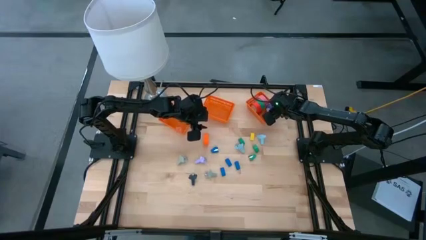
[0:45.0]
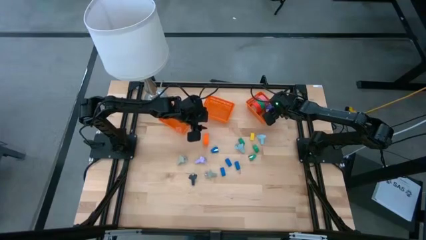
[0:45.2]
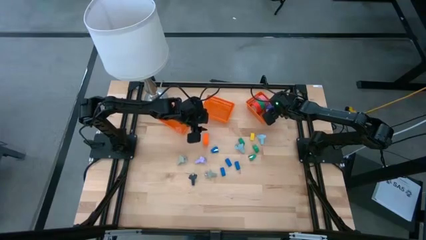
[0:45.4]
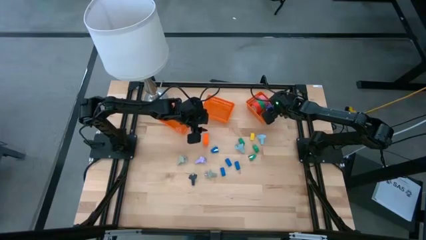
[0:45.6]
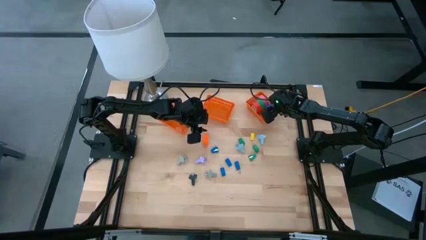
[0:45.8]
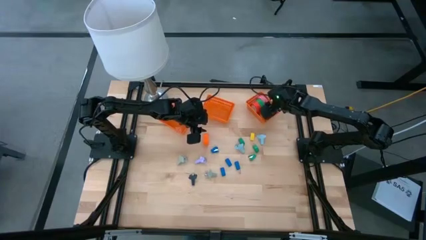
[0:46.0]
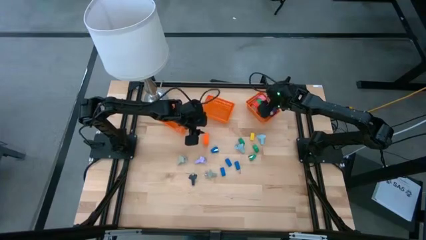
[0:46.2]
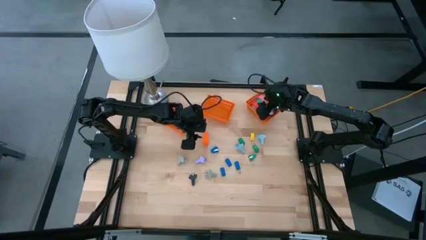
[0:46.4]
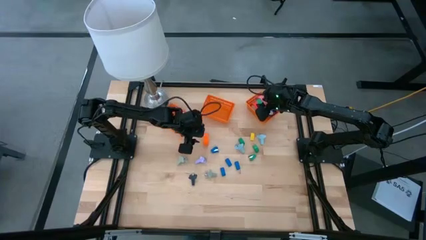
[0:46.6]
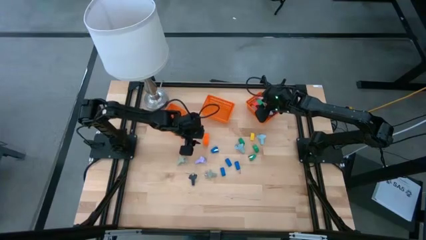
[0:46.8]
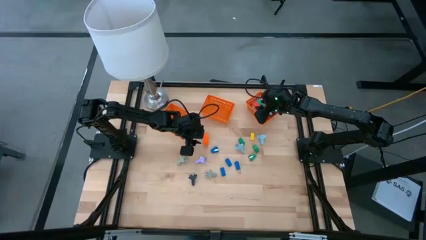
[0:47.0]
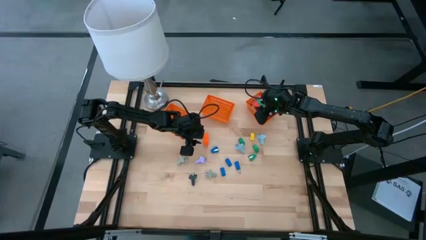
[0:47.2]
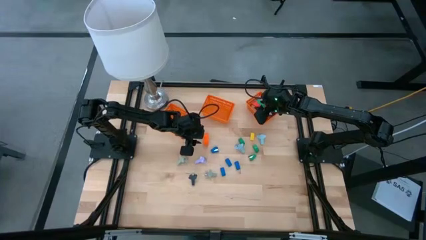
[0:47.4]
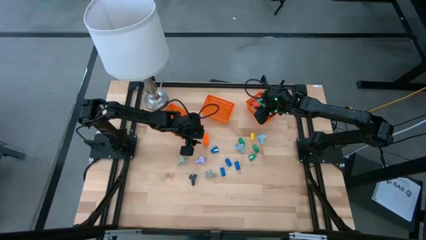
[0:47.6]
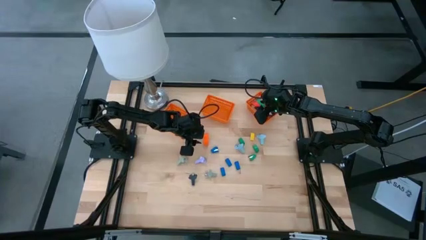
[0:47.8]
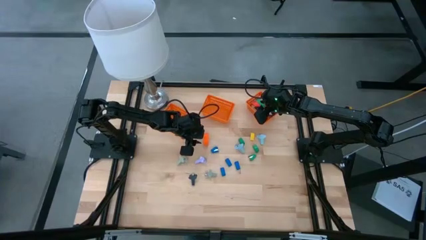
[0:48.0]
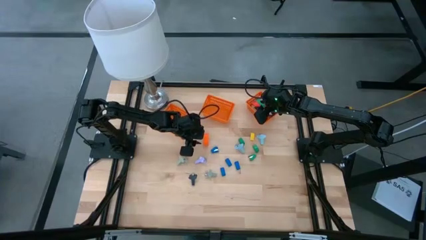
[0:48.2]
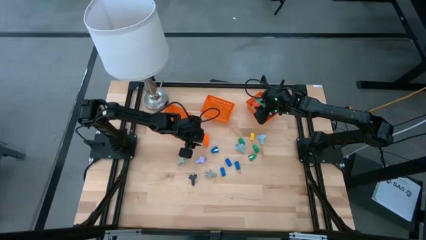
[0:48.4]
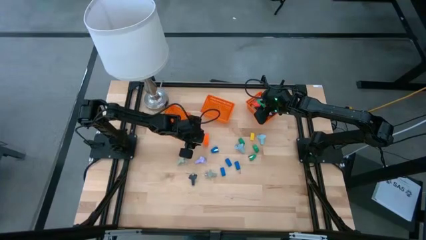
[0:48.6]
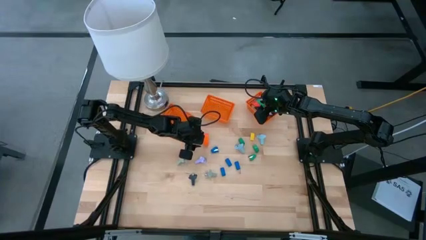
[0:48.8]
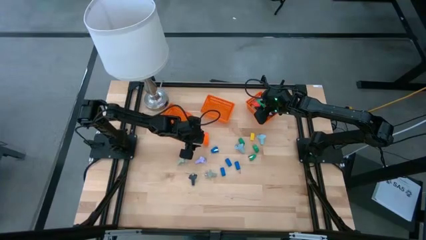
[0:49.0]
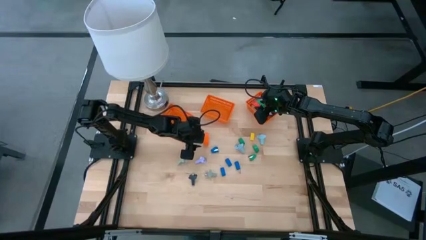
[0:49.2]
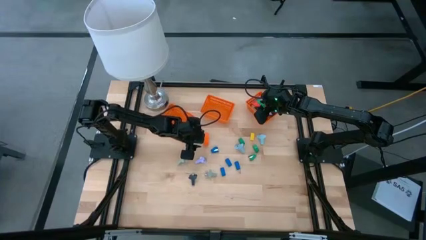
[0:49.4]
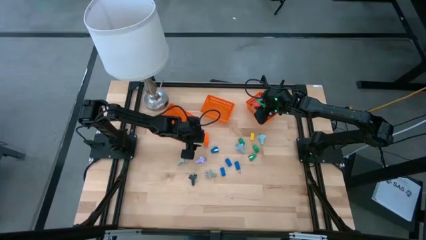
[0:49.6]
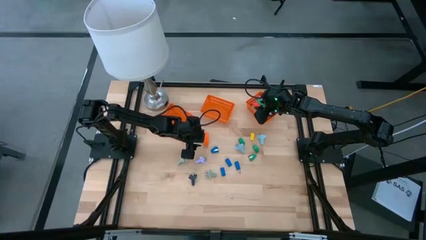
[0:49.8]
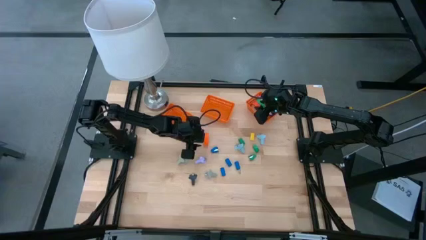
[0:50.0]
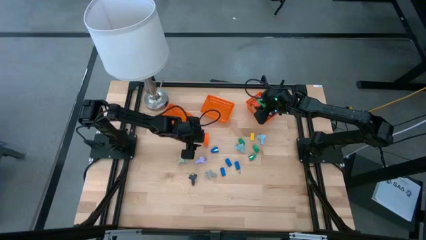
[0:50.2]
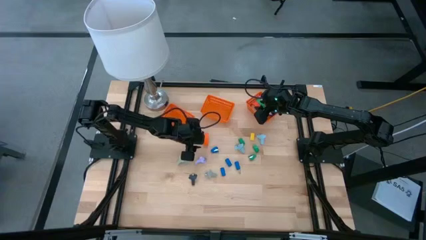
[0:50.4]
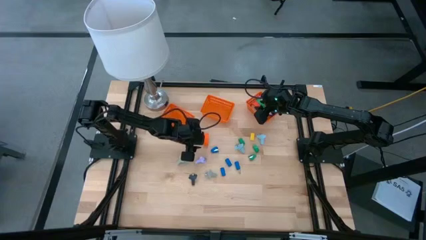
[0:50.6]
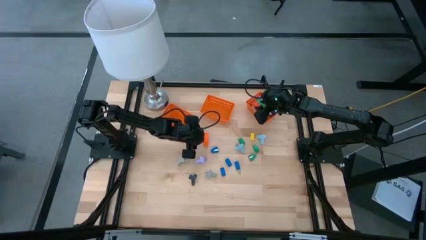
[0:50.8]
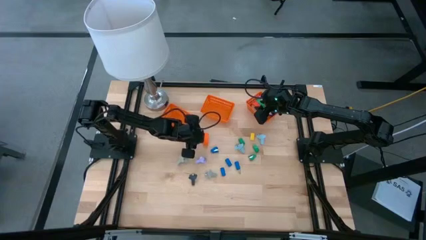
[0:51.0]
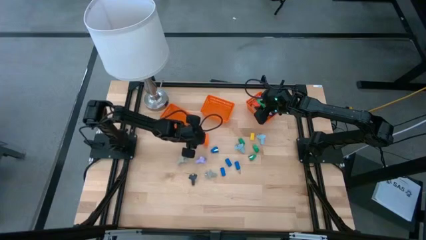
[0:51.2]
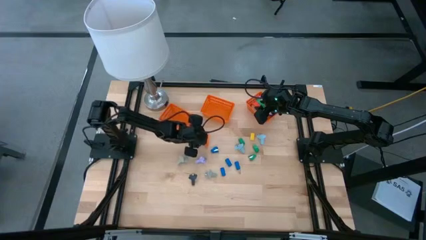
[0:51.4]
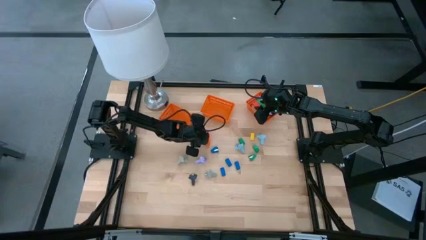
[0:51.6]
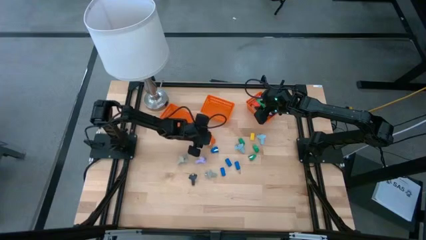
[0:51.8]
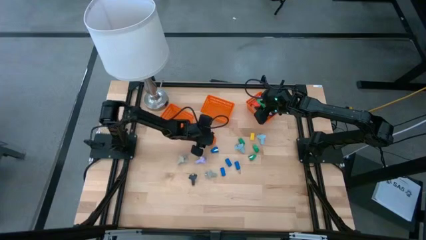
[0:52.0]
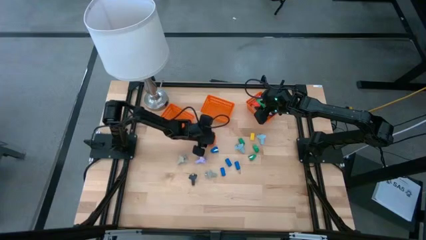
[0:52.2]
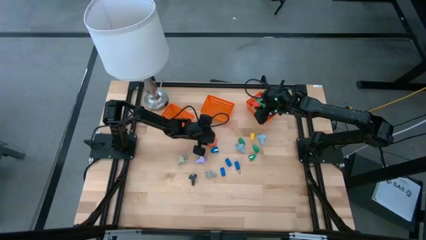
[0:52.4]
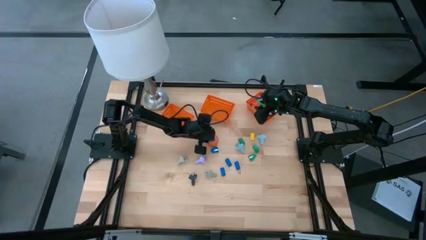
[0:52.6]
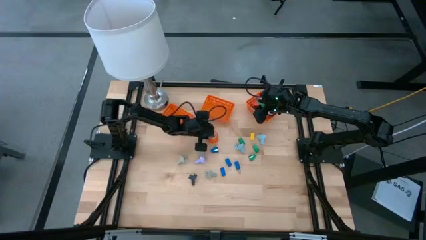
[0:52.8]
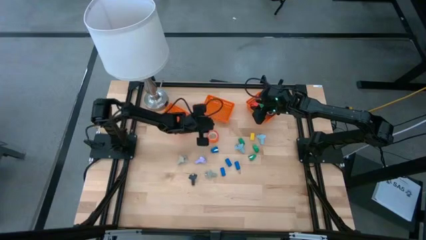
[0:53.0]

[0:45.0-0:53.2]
Task: Pick and place Stapler, Stapler remover, tape
Put the orange tape into the right orange bin

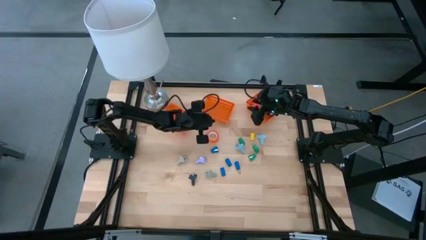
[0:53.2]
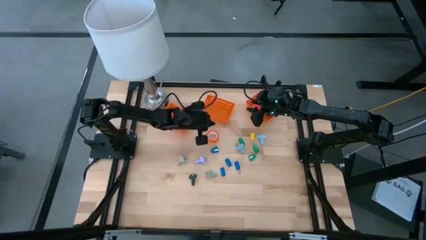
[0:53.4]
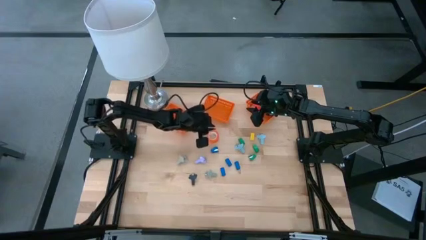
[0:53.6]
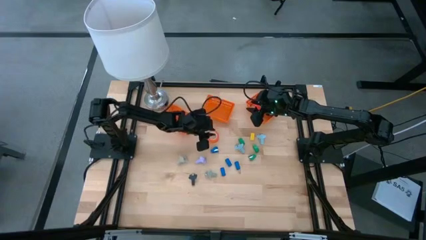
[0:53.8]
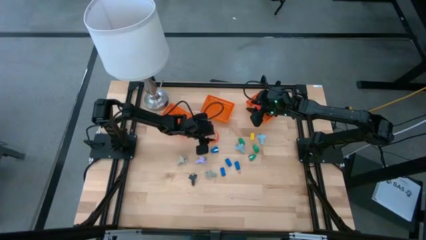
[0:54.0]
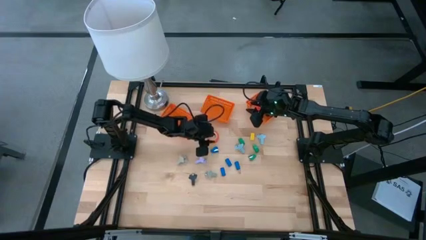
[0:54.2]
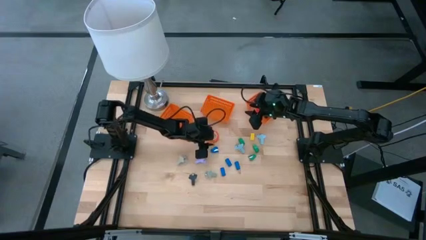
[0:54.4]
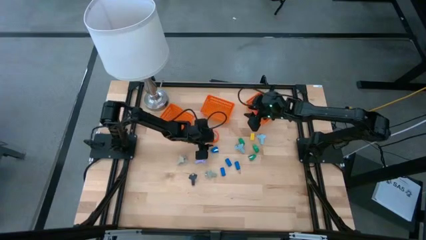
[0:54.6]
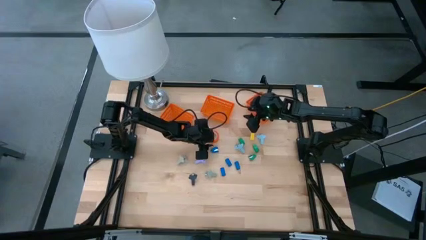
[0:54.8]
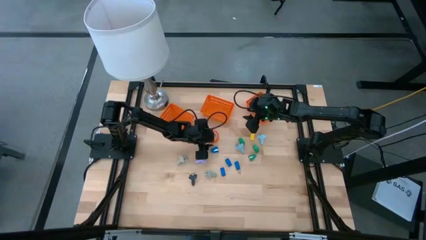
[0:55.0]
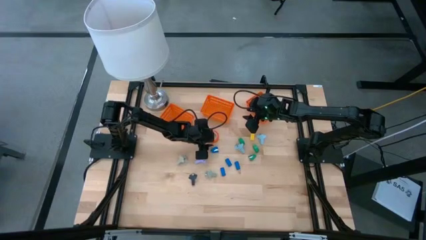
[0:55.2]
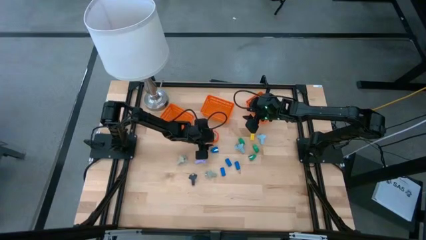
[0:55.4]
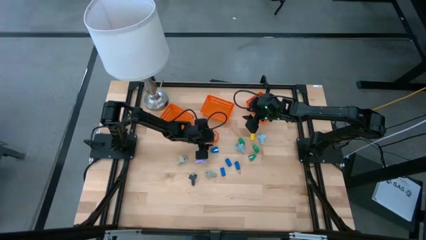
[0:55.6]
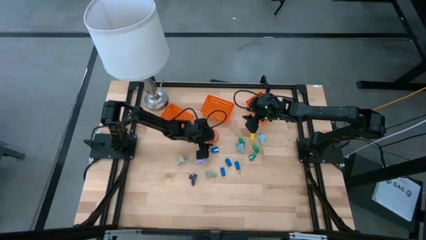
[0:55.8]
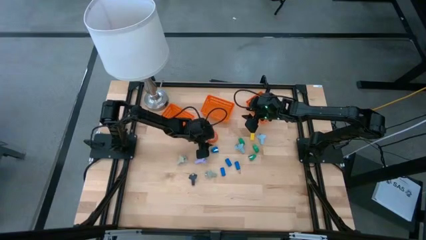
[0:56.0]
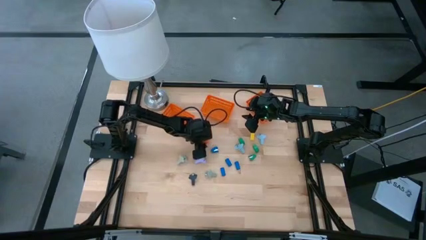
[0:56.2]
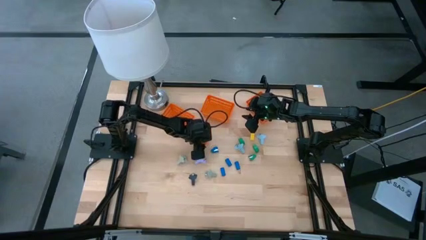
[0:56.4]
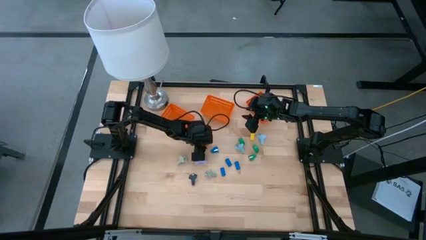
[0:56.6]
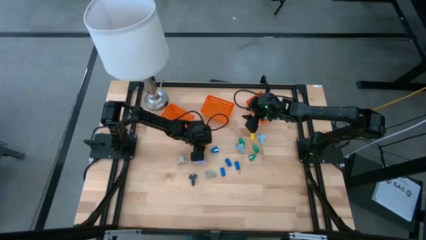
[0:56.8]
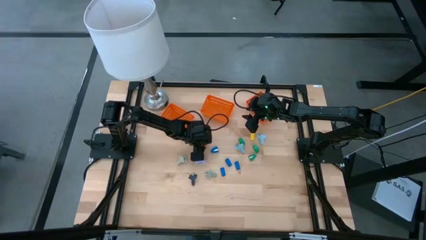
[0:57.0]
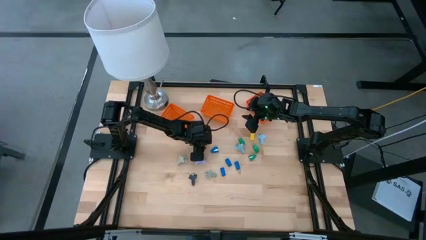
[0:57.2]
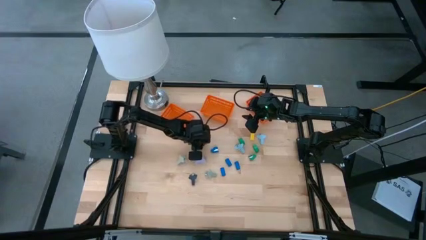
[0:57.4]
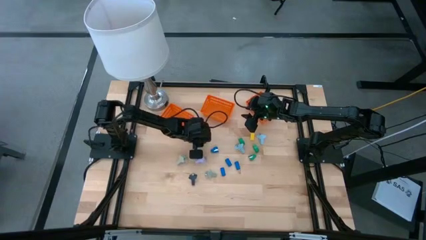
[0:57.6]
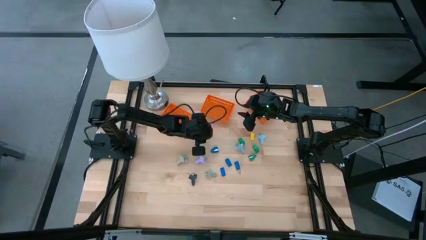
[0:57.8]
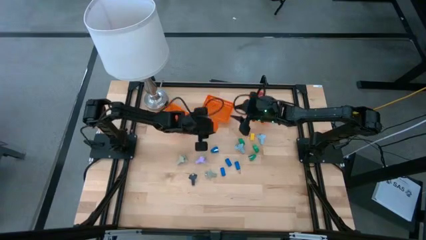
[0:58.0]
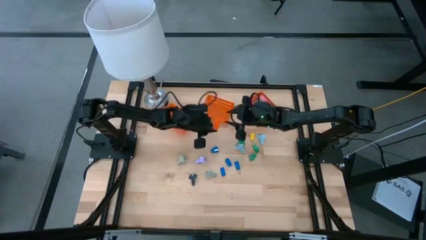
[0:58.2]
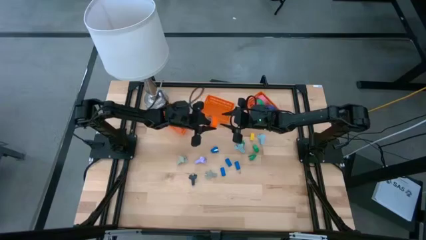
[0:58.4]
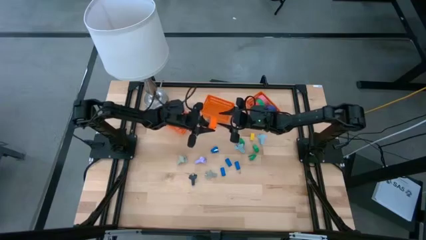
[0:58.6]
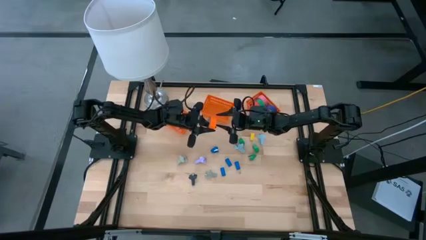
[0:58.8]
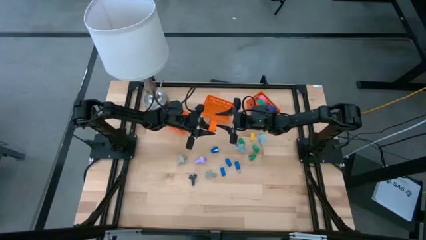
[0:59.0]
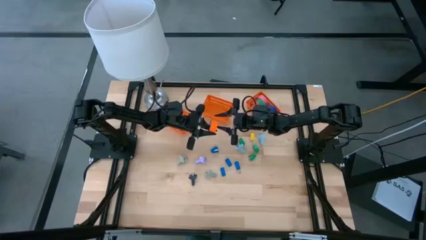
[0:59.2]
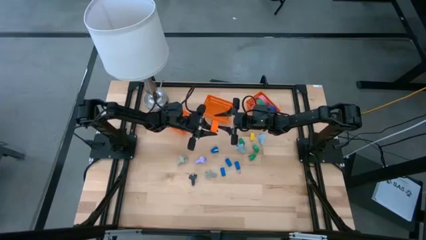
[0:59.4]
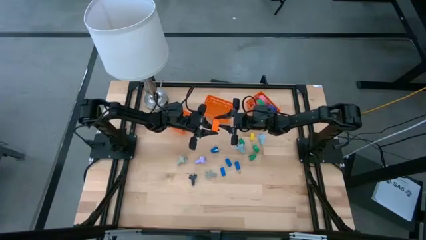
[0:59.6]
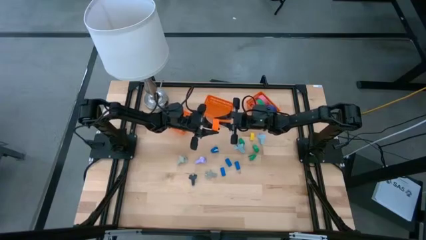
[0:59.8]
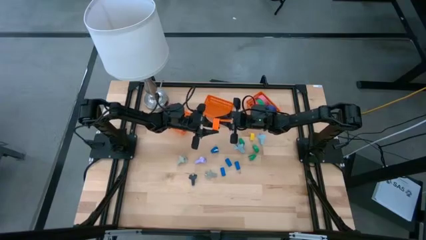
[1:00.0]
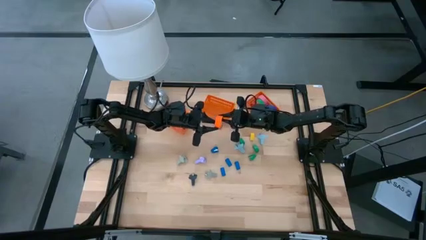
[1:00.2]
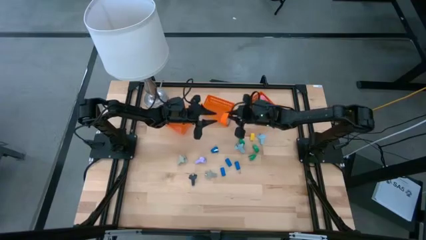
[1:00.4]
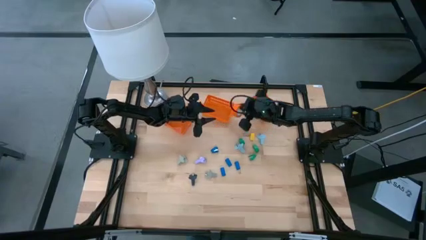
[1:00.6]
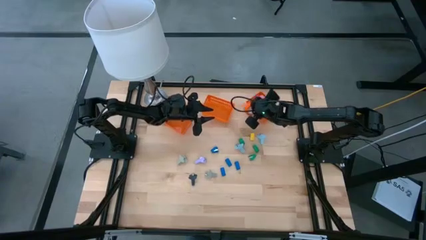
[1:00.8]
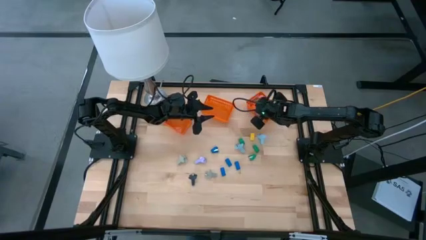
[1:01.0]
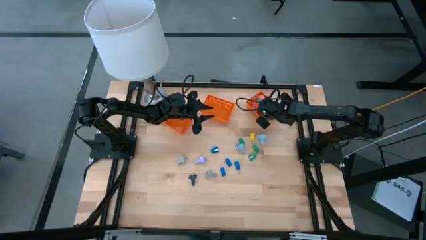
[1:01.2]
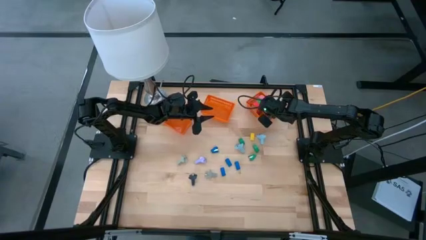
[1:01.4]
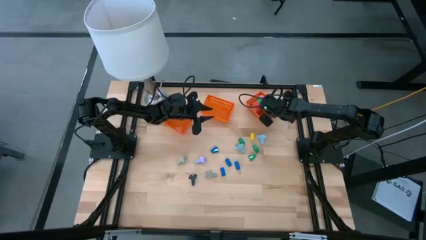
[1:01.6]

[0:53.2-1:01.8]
Put the orange tape into the right orange bin
